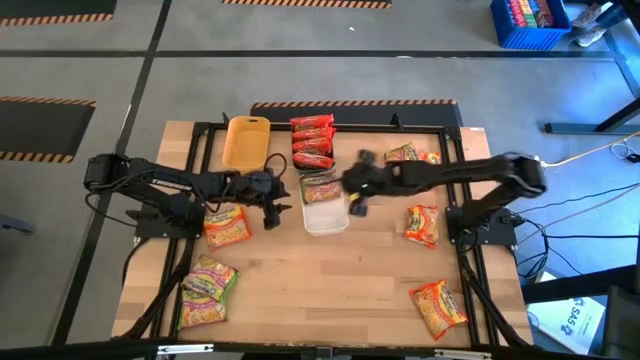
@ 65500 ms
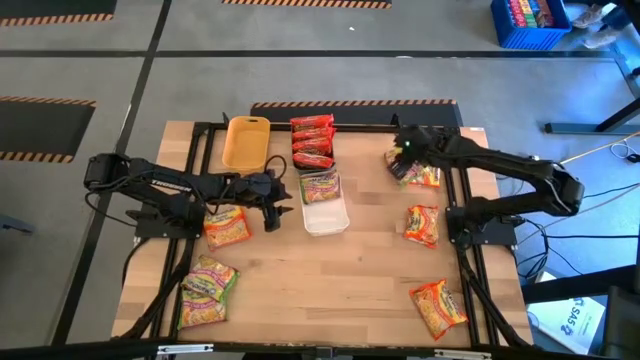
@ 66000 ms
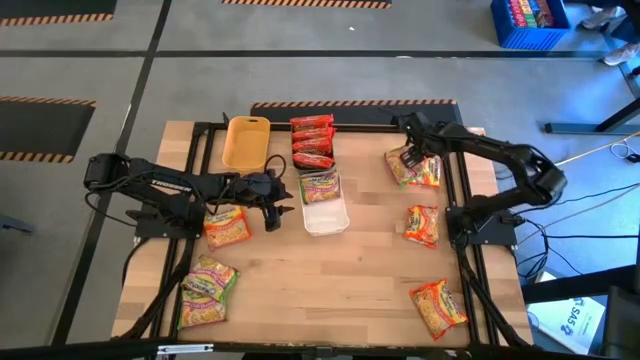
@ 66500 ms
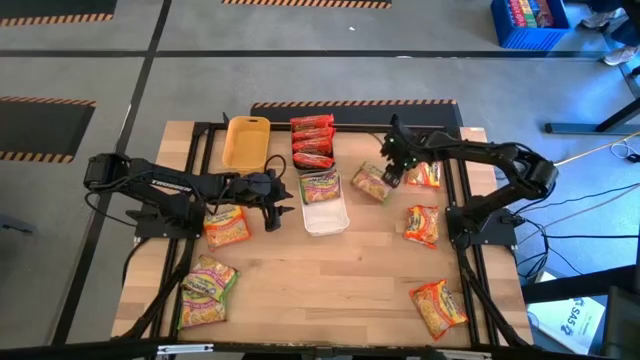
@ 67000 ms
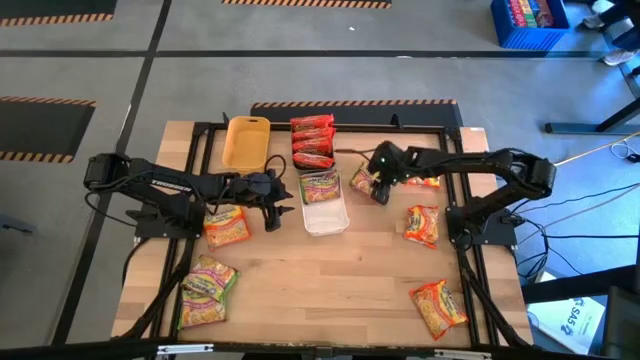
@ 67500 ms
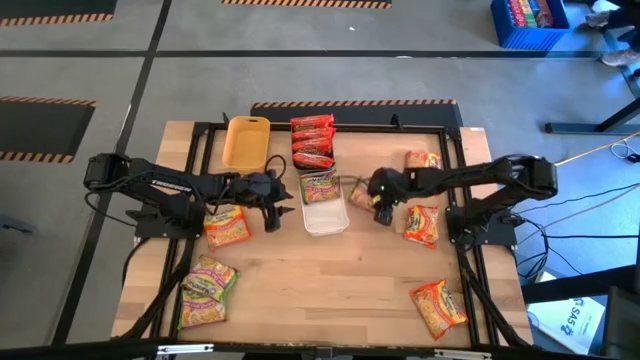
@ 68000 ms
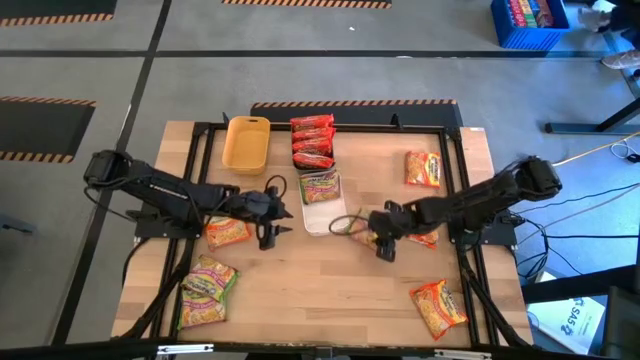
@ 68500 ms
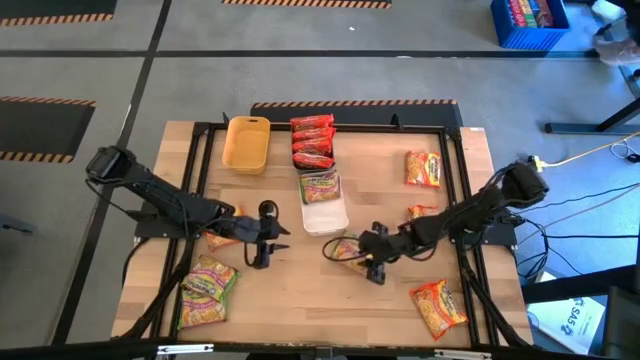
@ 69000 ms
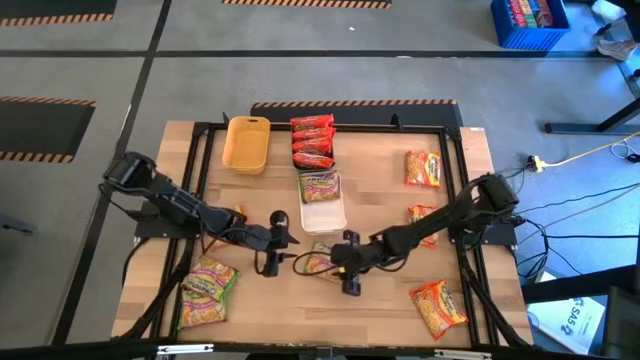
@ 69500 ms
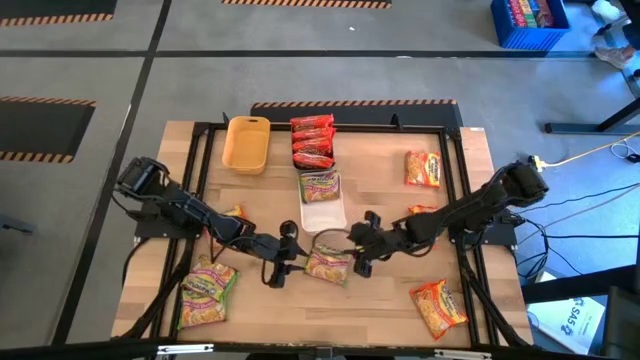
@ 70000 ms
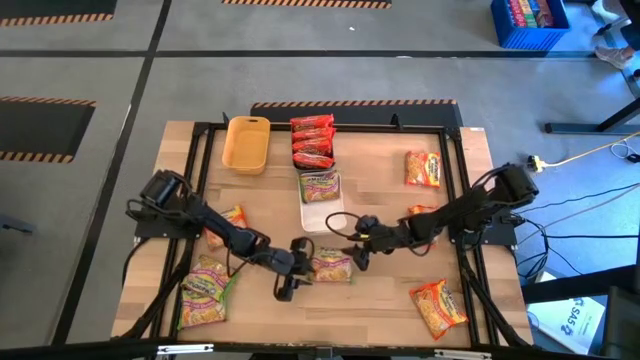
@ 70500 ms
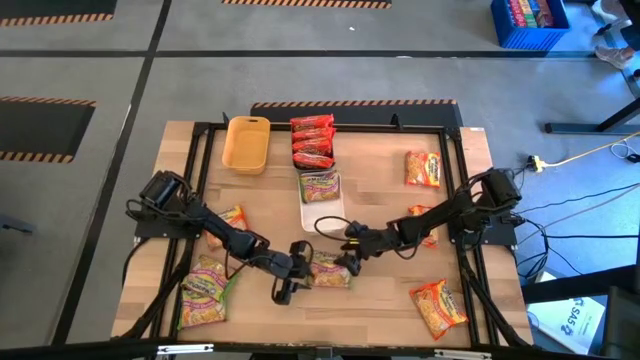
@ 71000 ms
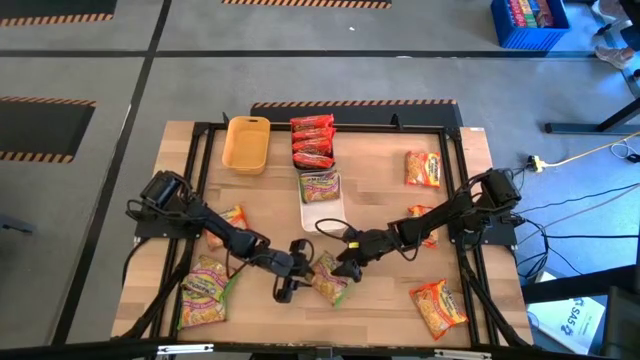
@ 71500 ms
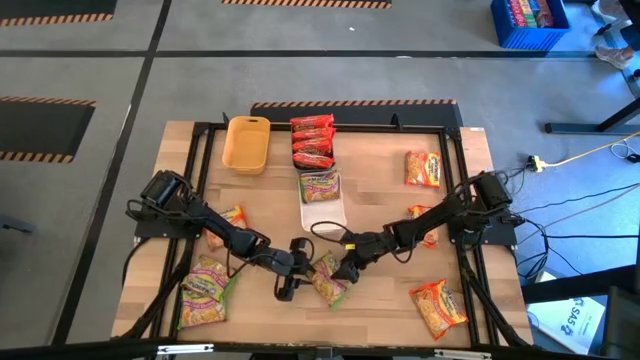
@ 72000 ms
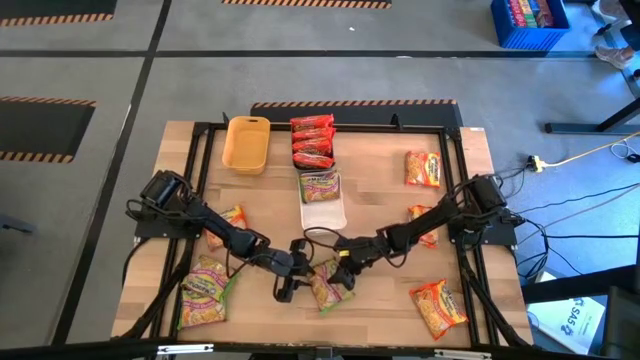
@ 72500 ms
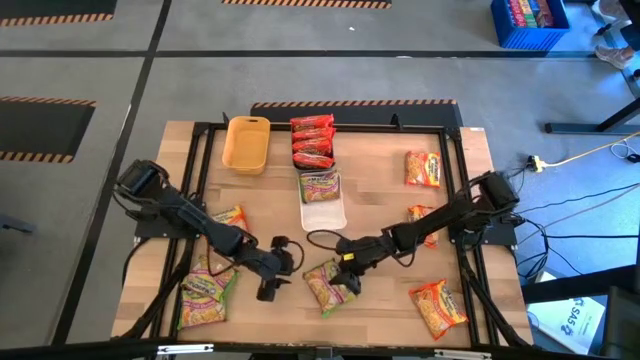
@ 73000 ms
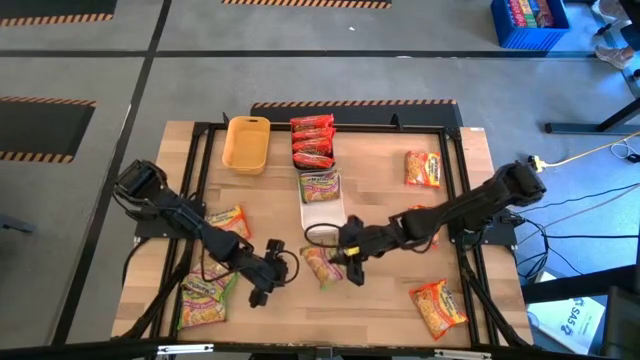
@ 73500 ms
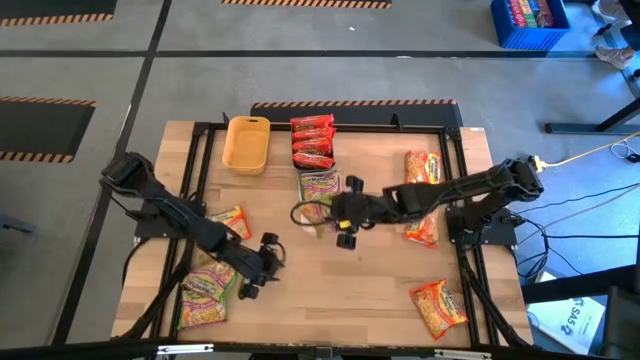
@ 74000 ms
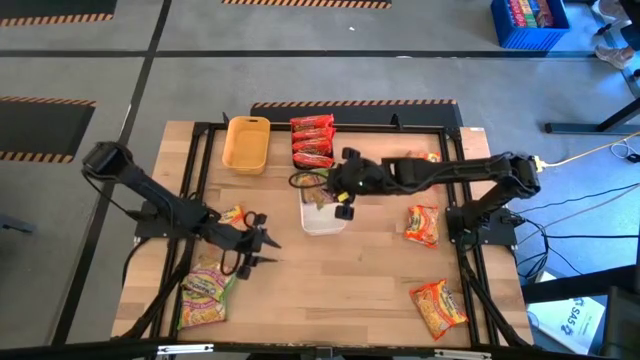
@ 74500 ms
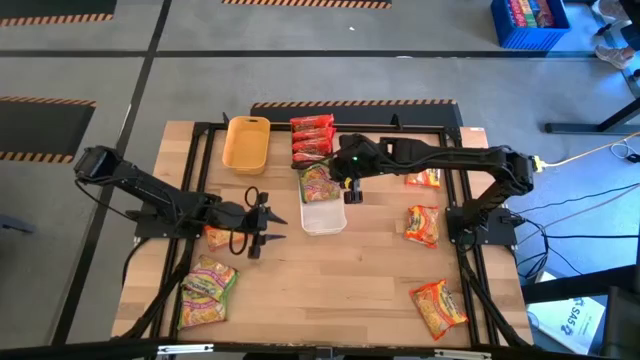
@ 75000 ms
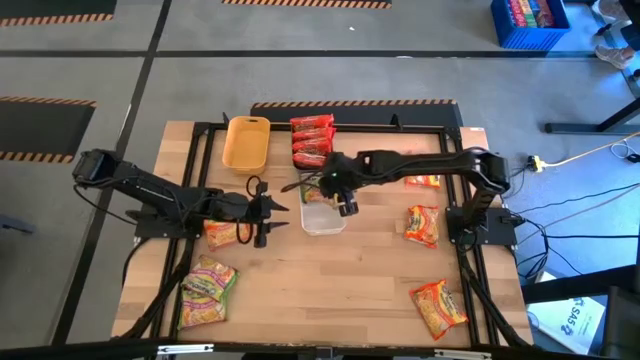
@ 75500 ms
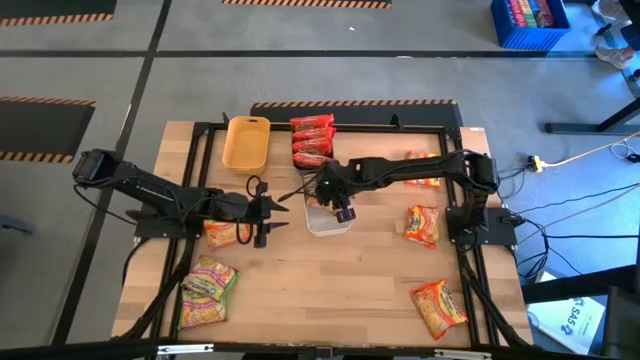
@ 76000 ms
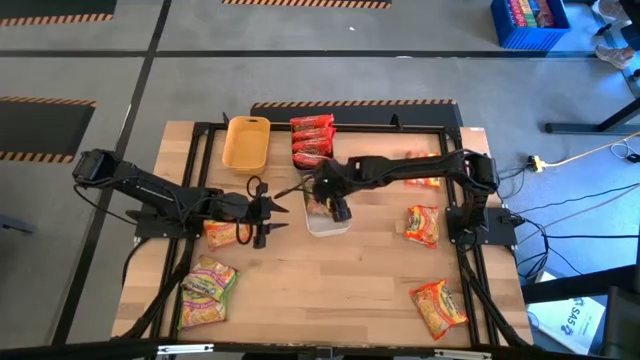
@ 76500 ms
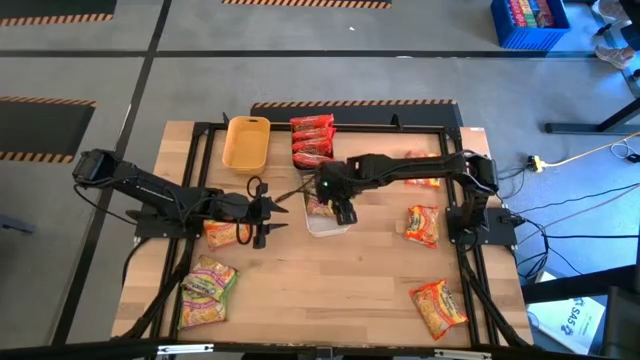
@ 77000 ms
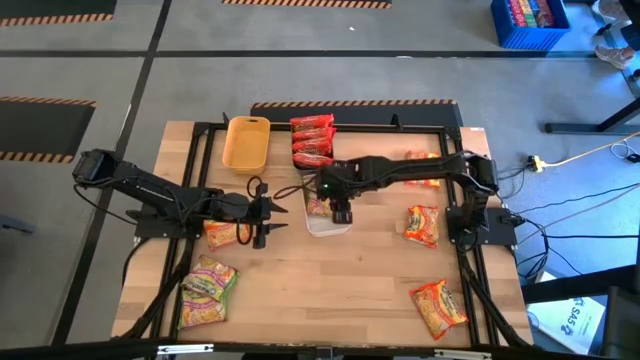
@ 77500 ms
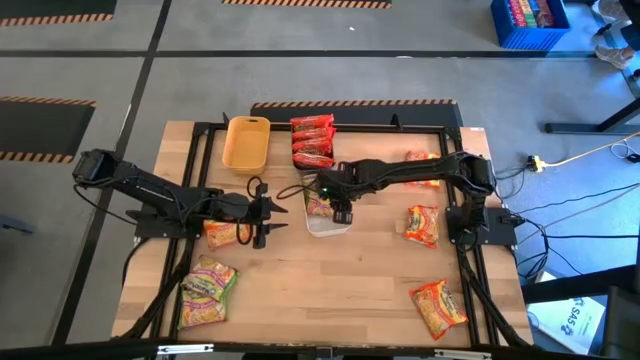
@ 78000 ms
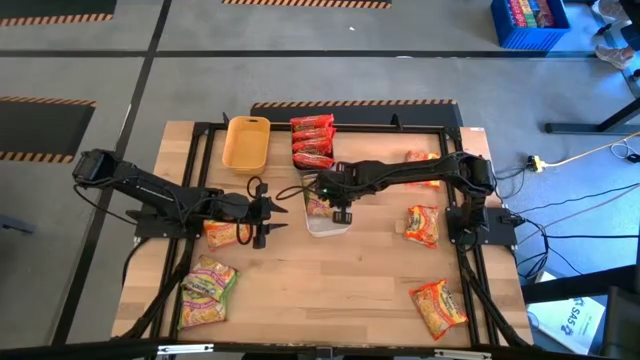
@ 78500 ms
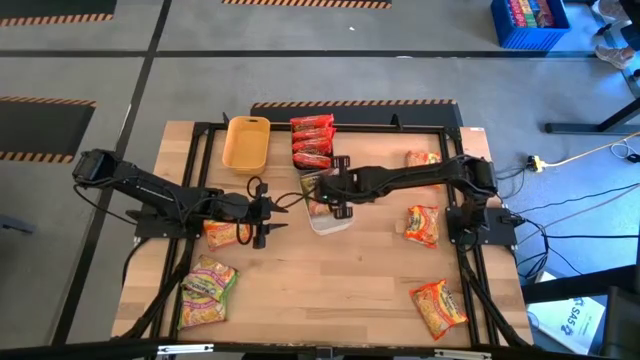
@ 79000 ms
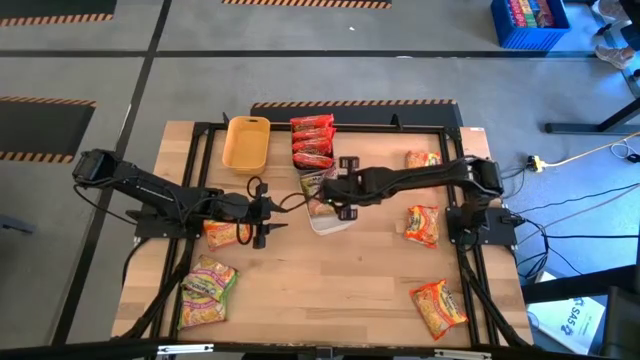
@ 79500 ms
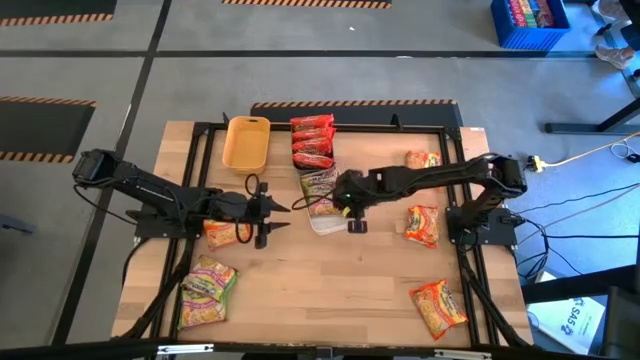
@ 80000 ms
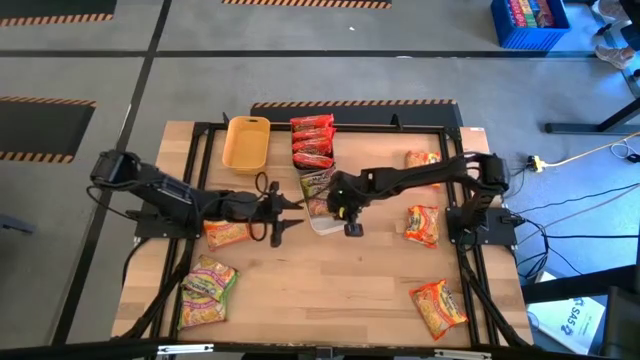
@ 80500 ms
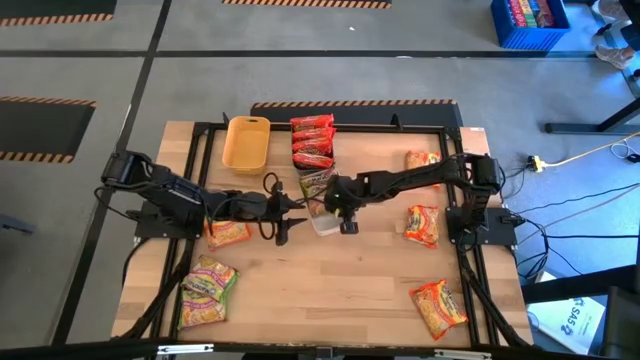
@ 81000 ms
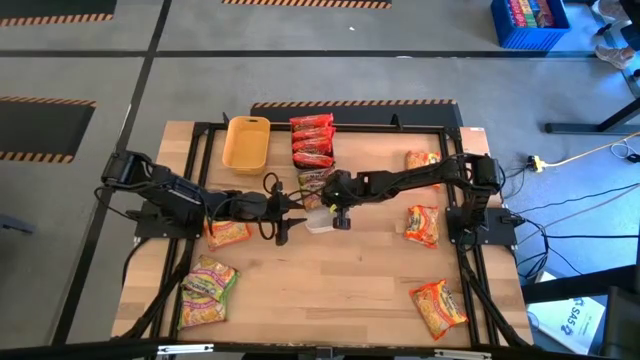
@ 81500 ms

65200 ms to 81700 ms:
Task: Sort Maruchan noodles
Put the top green noodle pack into the white bin

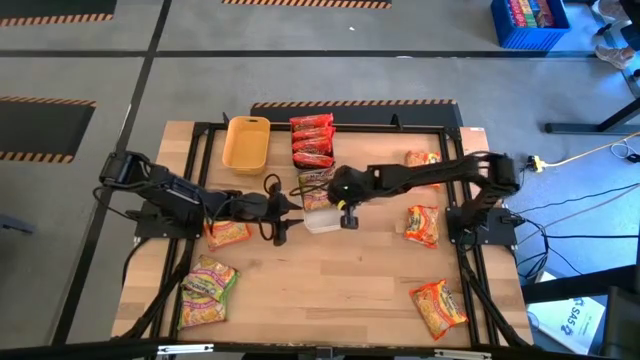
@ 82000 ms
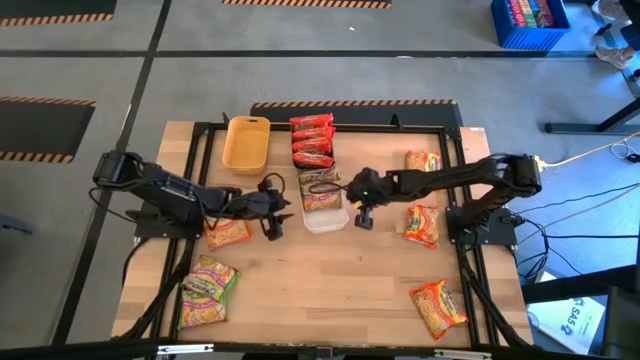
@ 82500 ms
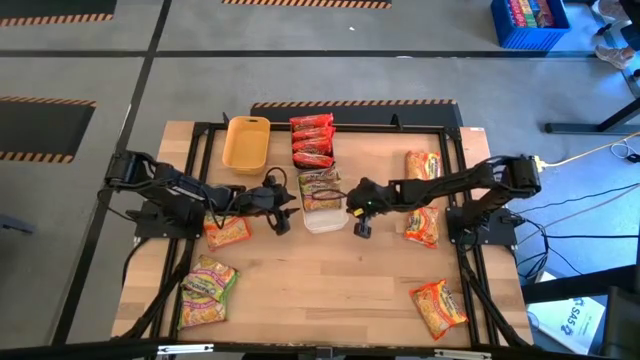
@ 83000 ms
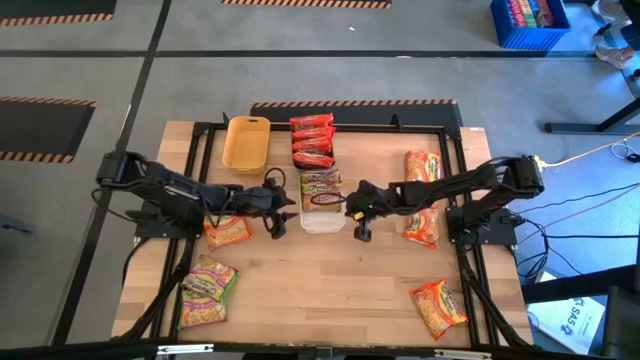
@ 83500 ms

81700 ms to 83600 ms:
Adjust the white bin on the table

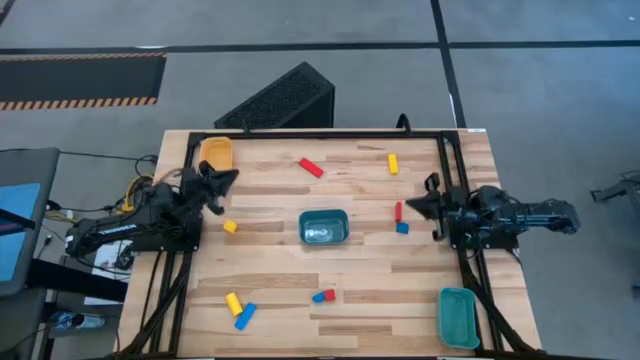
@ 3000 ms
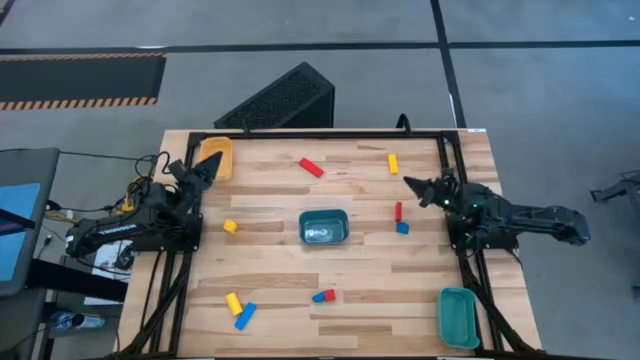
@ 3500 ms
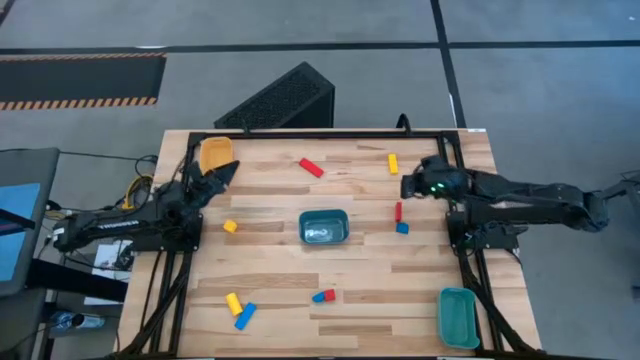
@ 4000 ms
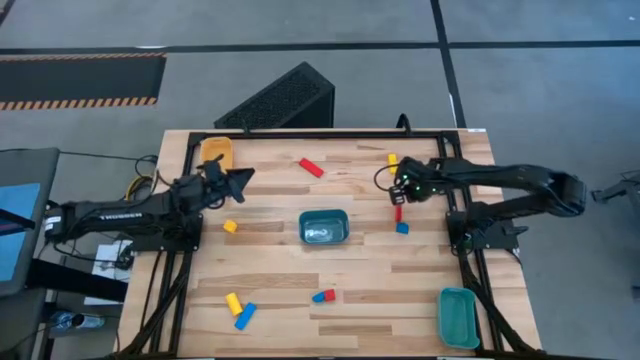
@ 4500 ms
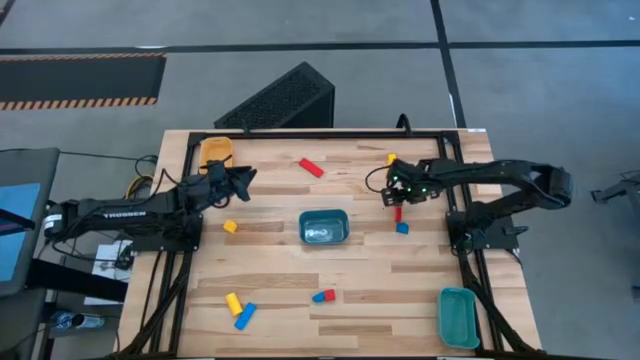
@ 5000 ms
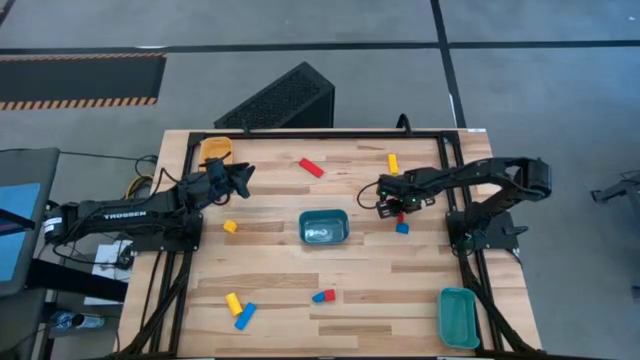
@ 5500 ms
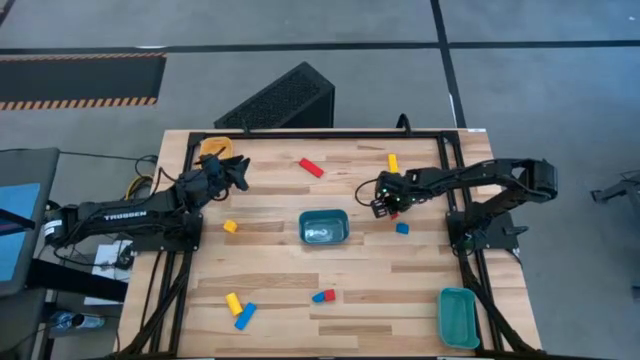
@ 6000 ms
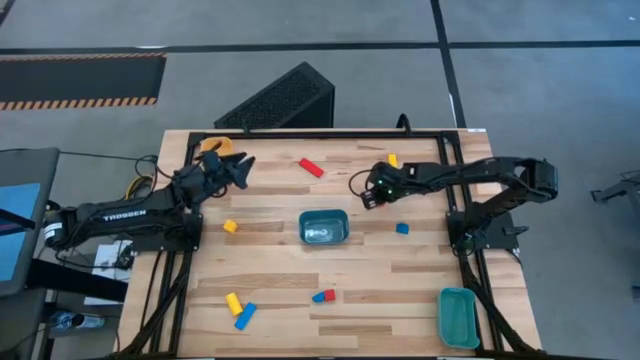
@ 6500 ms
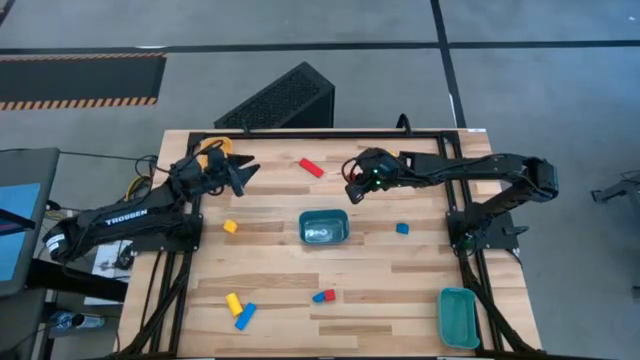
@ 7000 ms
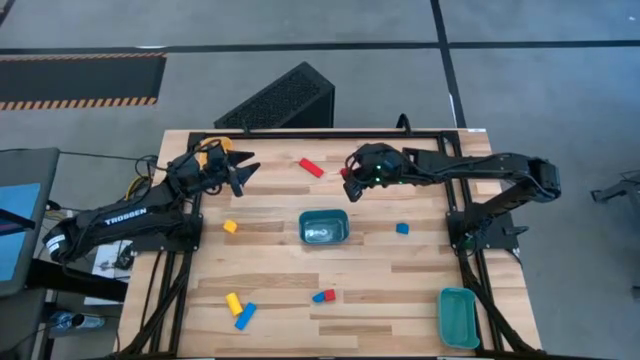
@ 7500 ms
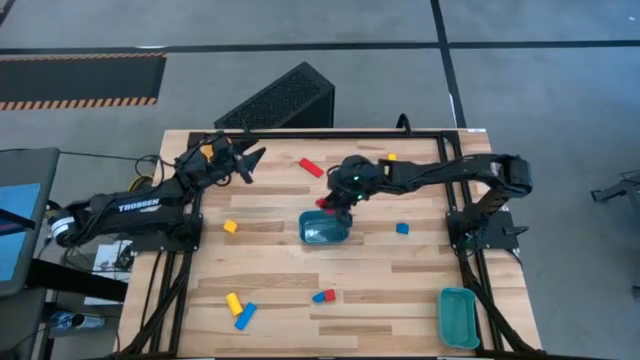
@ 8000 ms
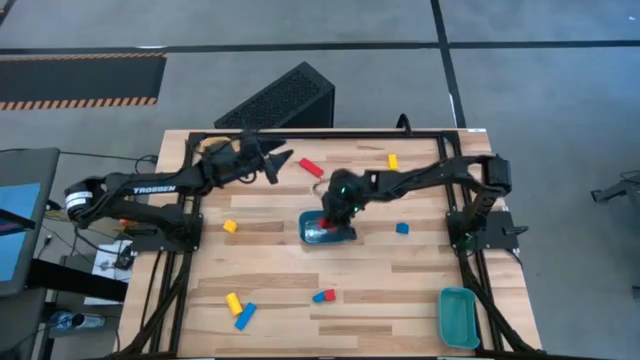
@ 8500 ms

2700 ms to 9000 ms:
Task: Sort & place blocks by color
Put the top right red block into the blue bin
